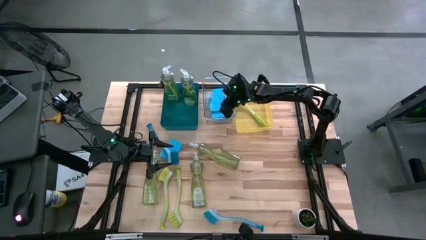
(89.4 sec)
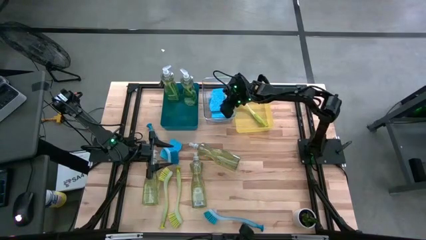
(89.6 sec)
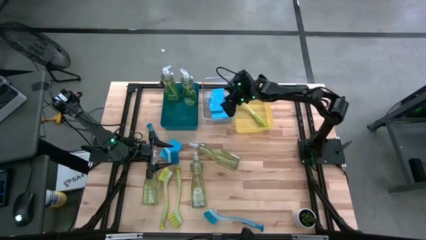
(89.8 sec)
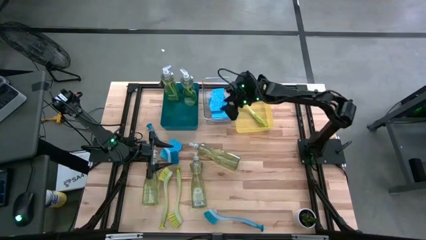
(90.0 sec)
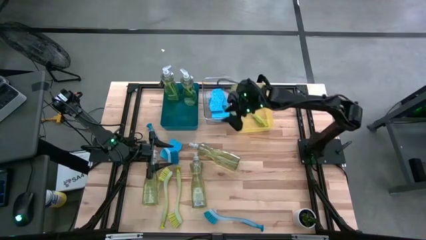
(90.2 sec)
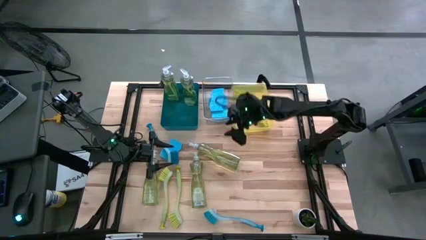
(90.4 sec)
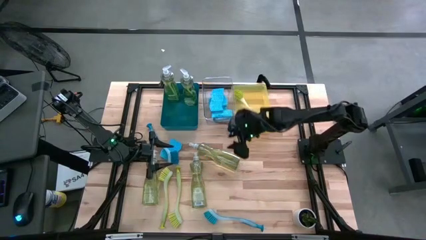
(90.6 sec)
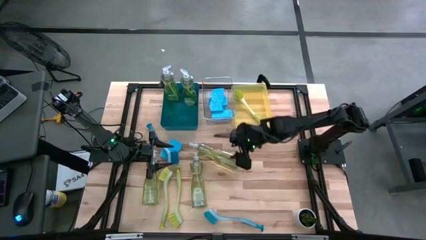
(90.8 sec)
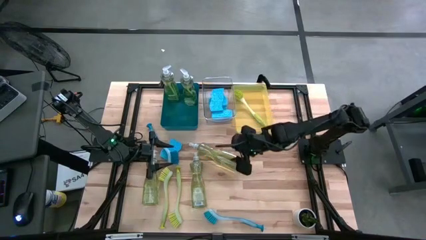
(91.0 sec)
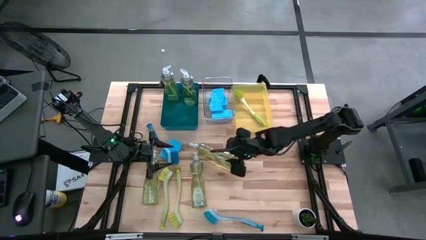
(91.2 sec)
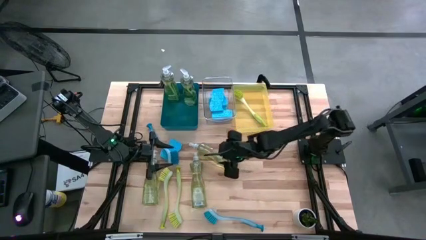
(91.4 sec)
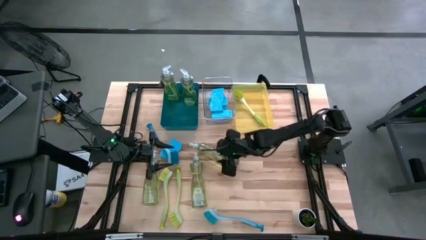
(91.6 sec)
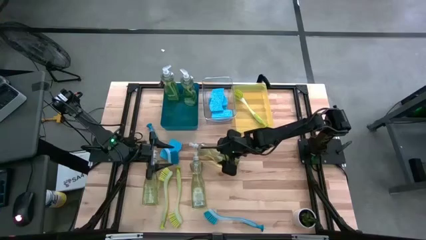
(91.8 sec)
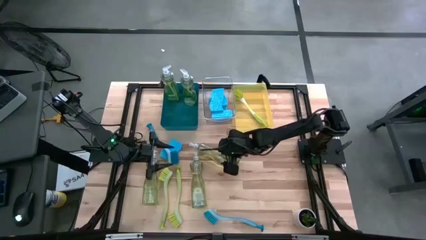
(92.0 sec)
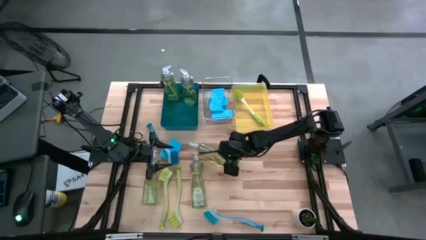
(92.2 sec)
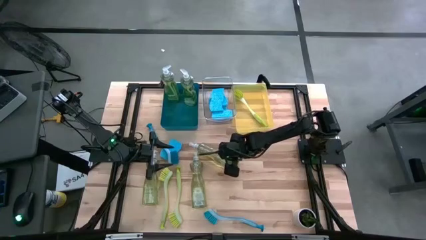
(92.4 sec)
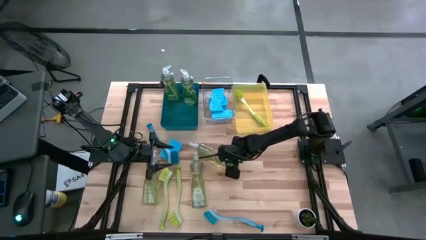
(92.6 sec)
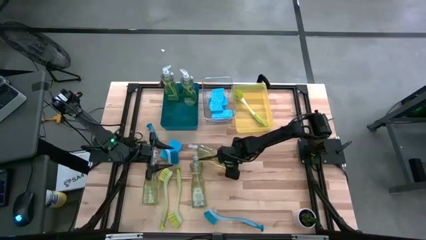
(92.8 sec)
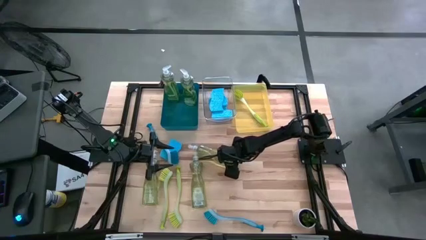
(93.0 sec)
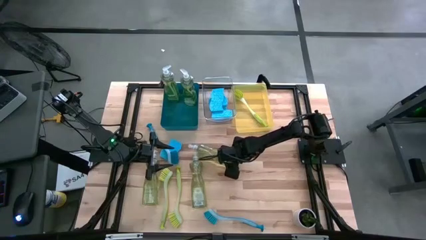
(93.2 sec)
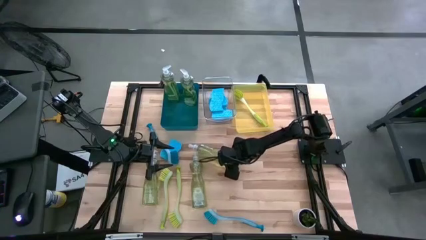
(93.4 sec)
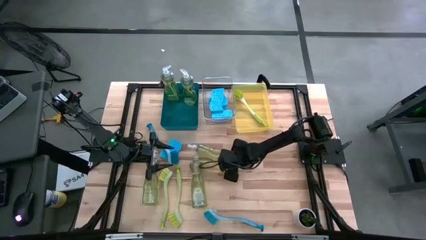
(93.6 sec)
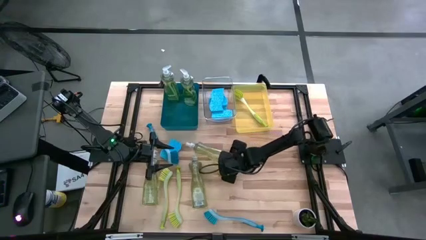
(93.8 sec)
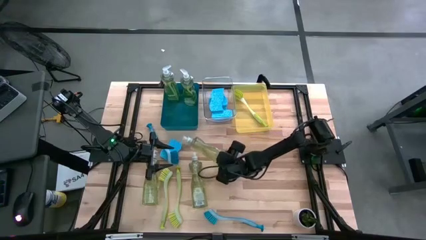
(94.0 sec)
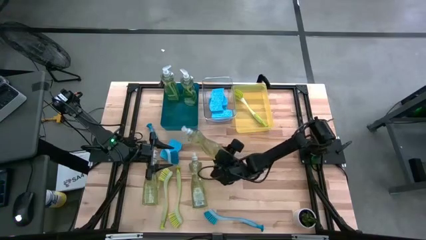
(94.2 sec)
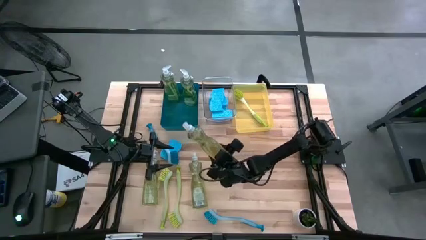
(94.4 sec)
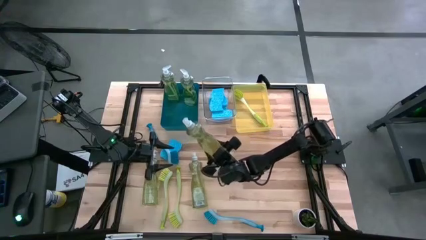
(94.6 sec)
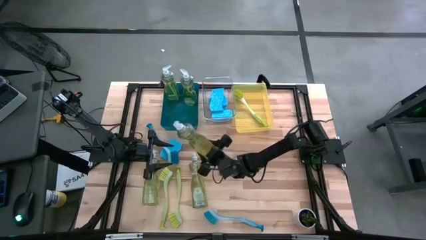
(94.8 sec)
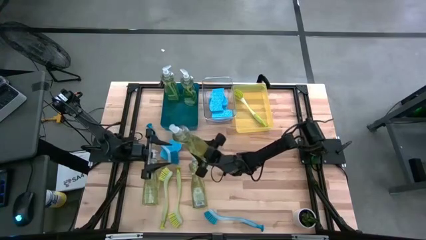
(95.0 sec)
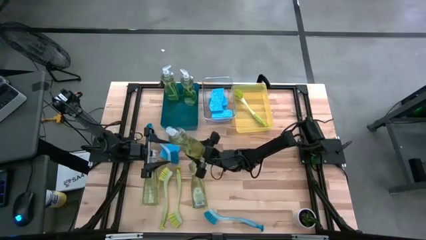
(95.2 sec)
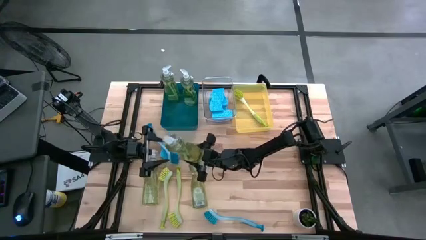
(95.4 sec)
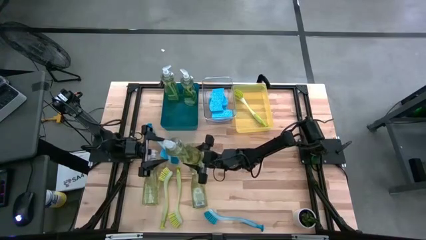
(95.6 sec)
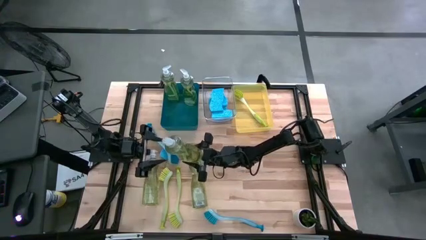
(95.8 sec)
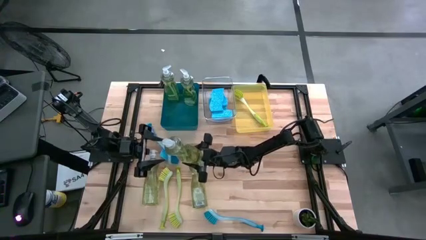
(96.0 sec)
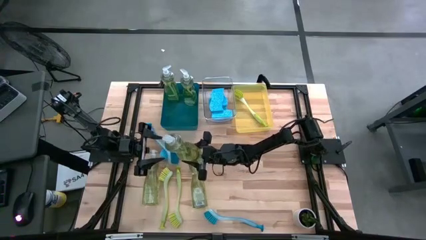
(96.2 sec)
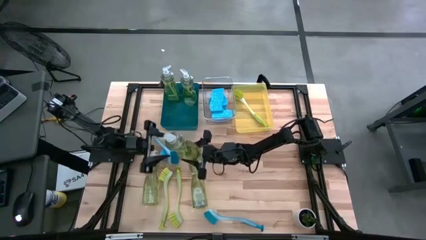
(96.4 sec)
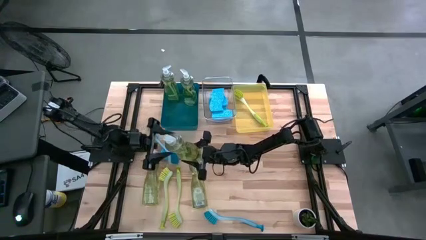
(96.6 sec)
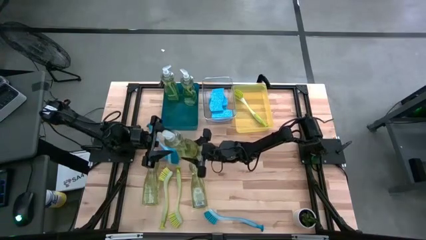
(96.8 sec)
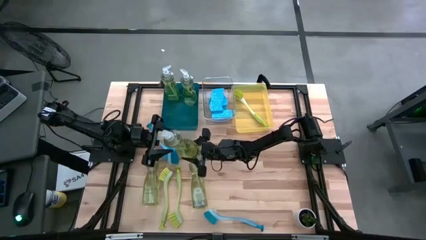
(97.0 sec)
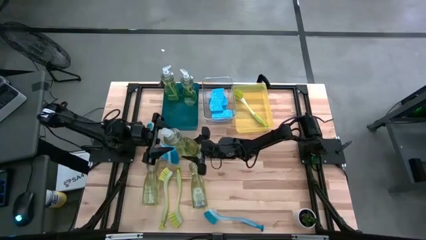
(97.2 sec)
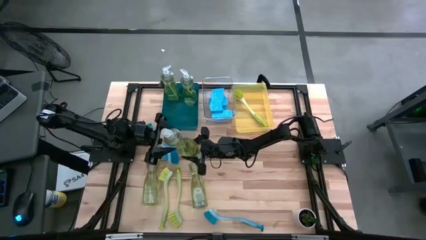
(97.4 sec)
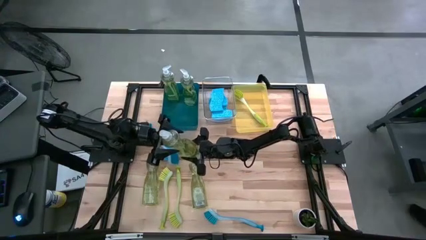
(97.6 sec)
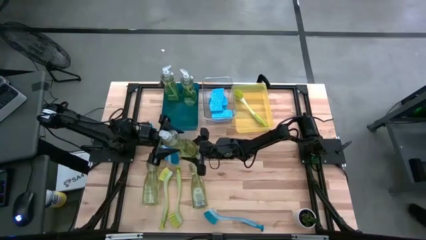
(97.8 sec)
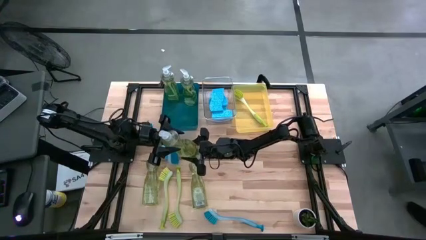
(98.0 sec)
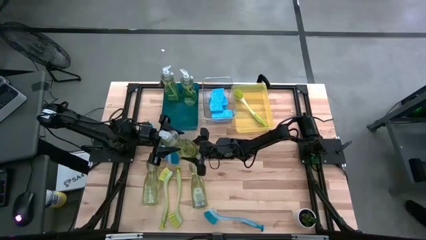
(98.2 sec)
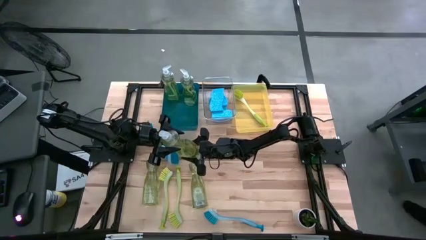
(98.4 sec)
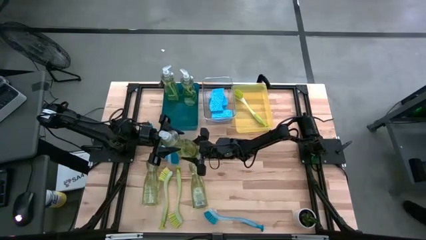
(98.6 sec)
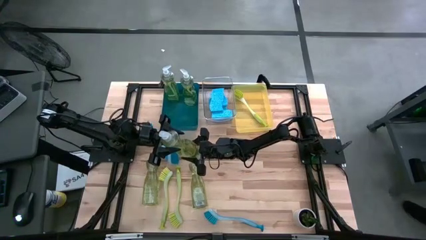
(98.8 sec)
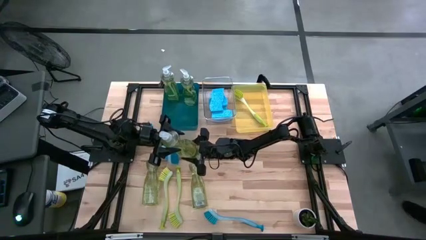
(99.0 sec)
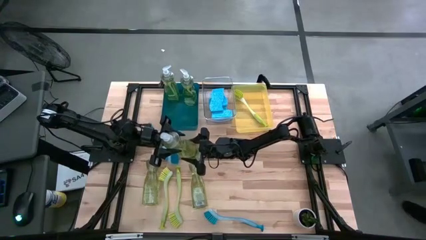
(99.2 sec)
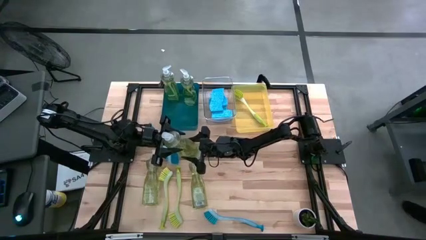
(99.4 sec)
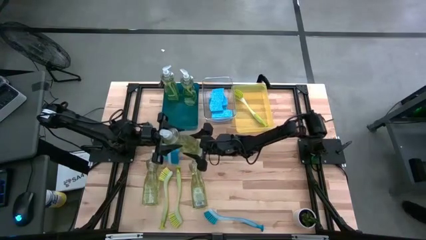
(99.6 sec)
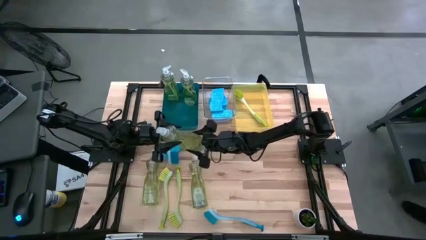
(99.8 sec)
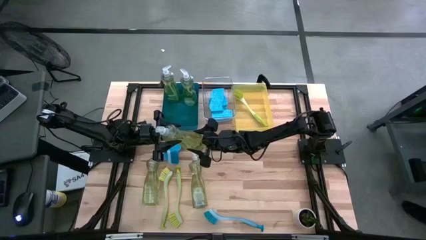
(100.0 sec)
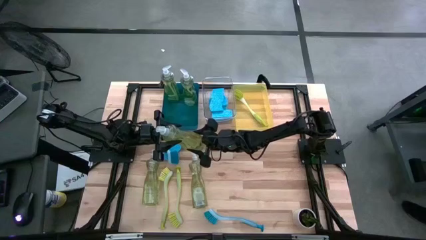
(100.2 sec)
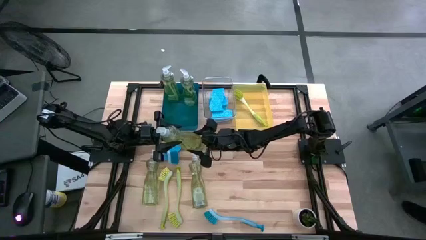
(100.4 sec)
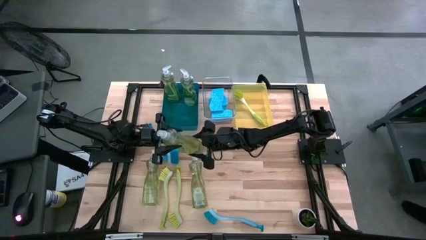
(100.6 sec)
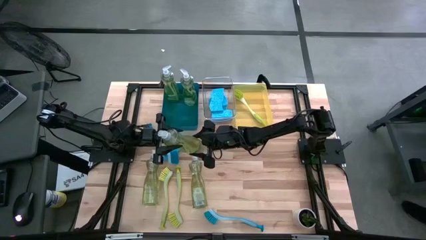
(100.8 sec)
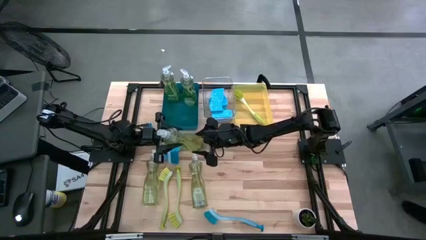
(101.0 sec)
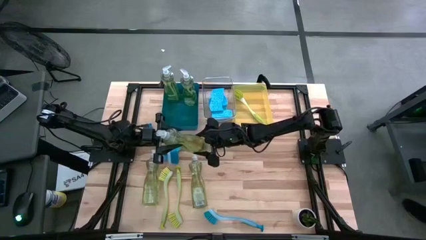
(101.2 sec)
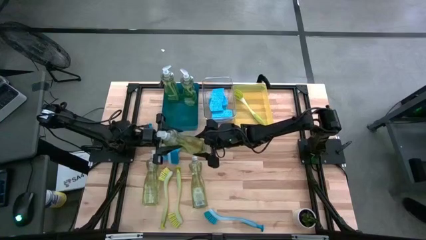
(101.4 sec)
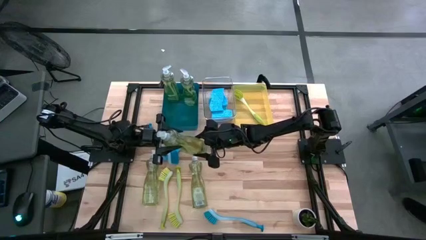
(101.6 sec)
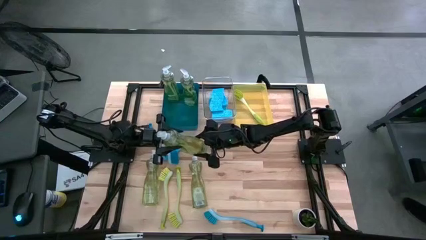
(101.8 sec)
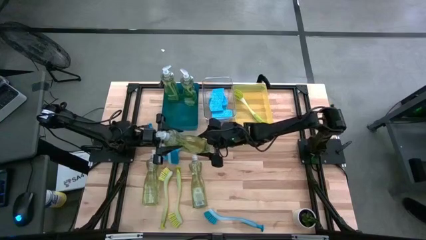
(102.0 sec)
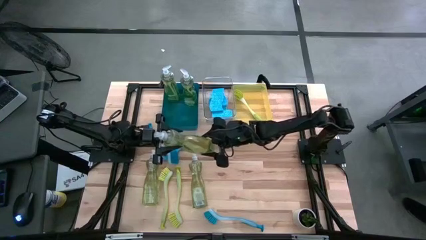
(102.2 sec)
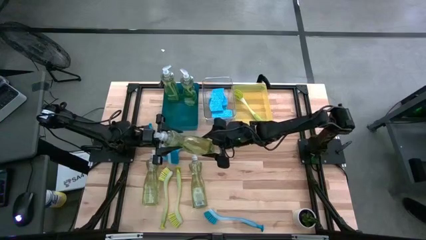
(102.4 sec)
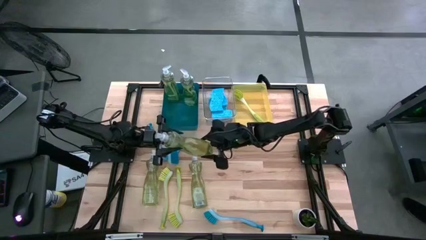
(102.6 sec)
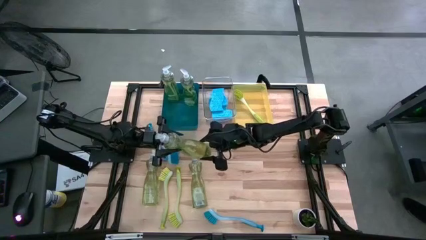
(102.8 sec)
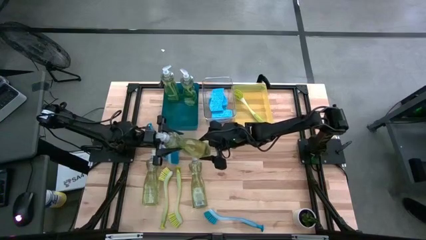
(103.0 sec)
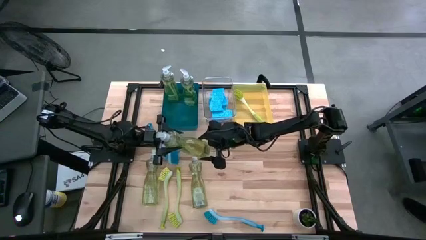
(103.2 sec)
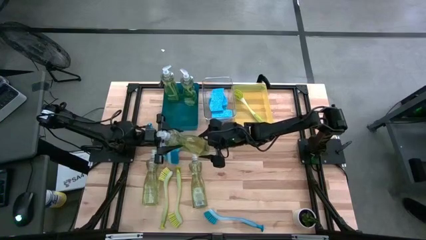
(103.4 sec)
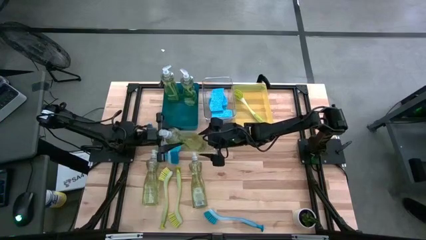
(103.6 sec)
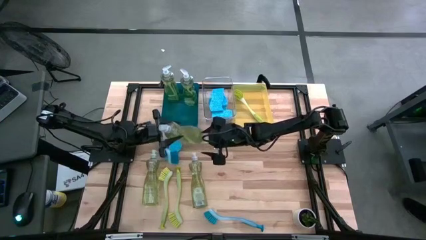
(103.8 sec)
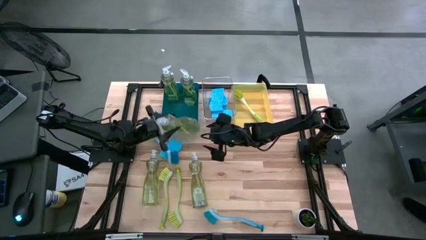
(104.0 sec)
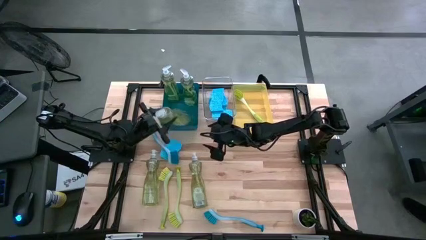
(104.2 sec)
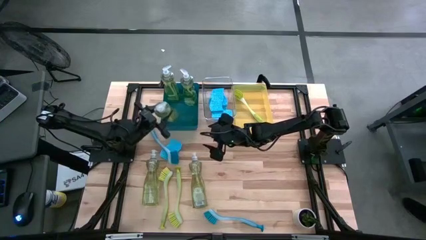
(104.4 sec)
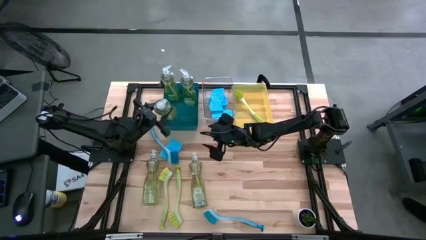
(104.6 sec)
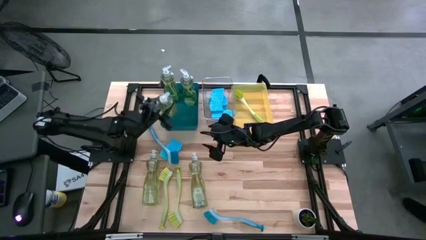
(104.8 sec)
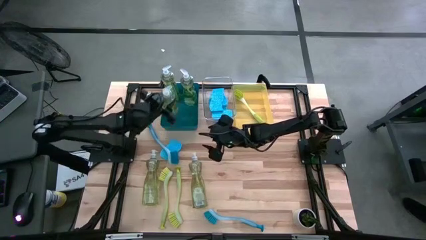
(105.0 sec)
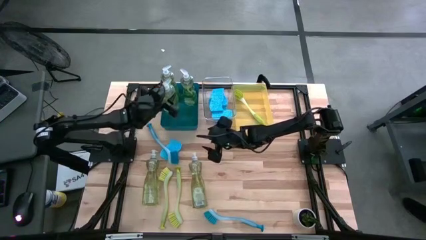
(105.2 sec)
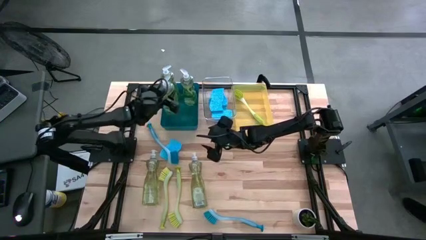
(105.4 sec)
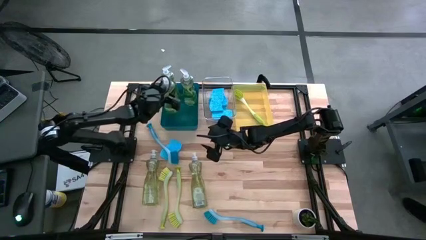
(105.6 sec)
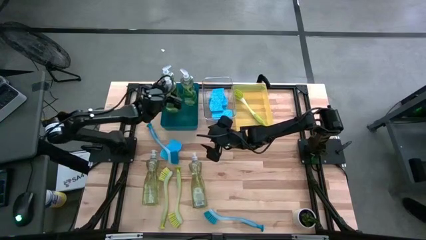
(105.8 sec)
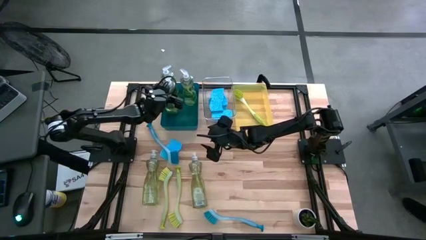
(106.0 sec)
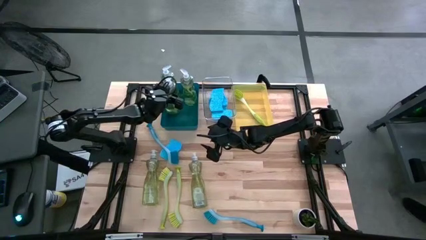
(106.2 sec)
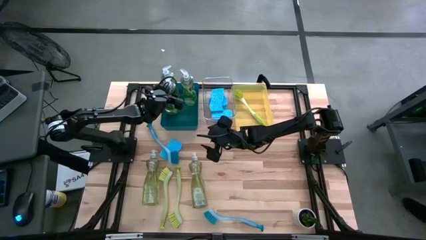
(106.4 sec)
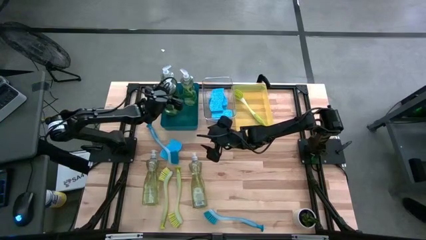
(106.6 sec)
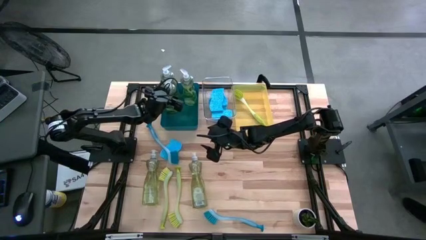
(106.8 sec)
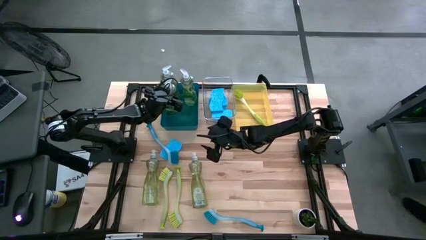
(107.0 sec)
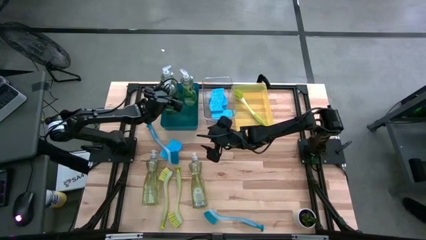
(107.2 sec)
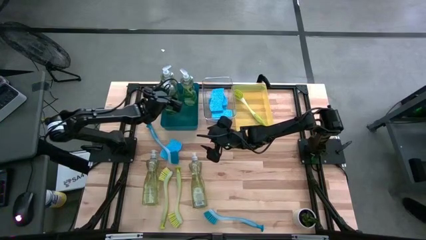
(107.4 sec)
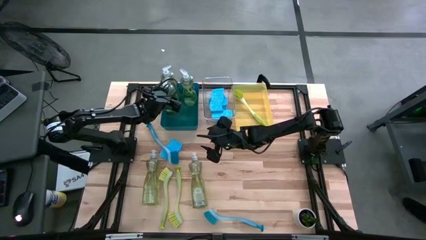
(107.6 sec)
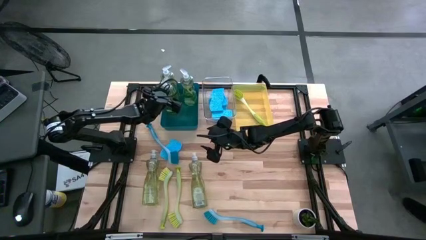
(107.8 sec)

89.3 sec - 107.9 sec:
Task: Pick & Place Kitchen Sink Supplies
Put the dishwashing liquid into the blue bin
